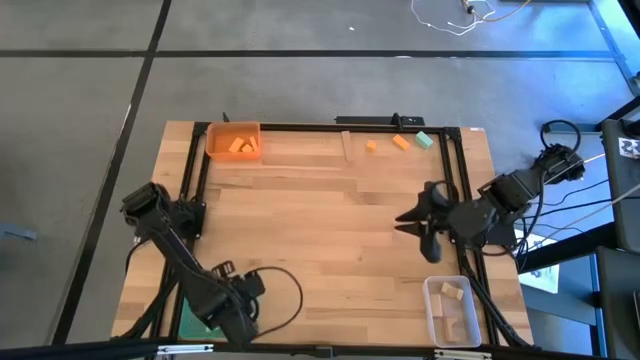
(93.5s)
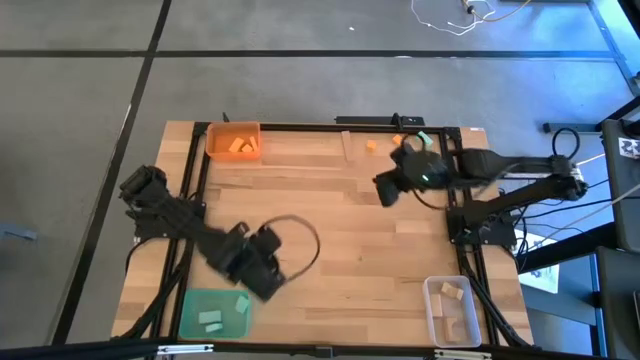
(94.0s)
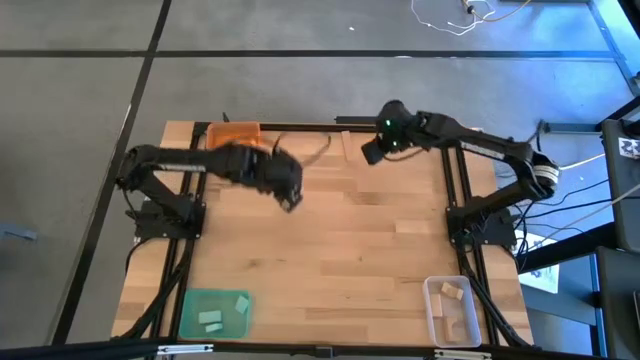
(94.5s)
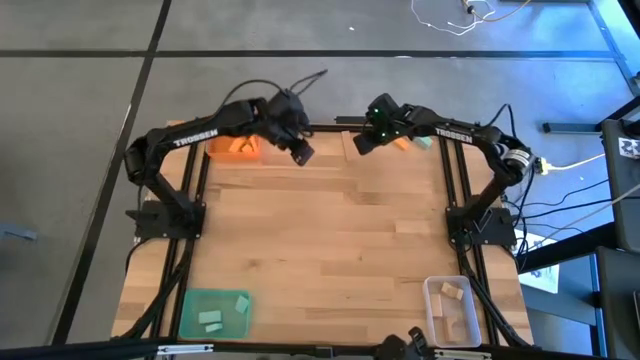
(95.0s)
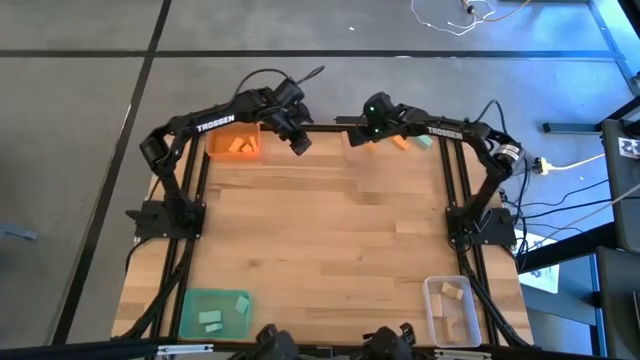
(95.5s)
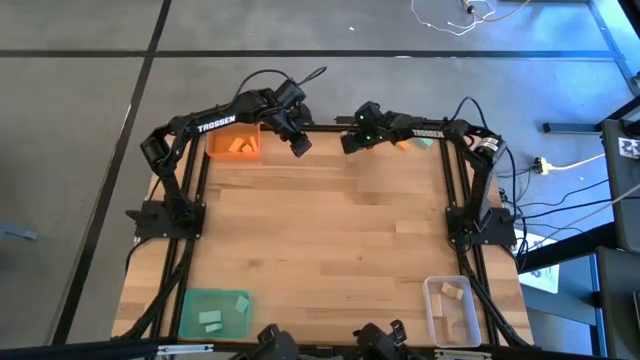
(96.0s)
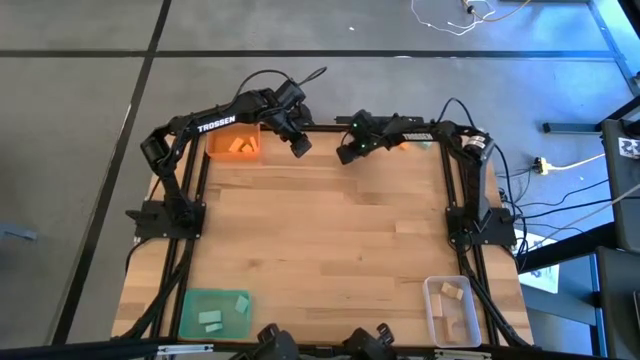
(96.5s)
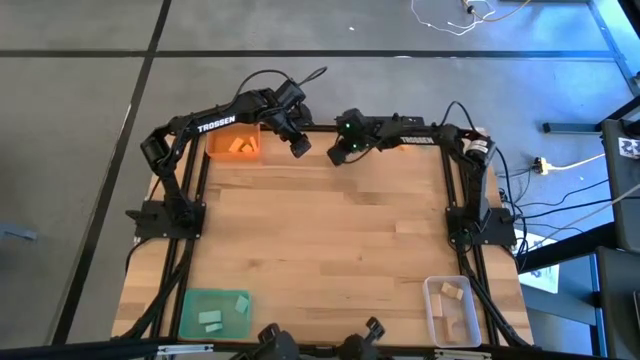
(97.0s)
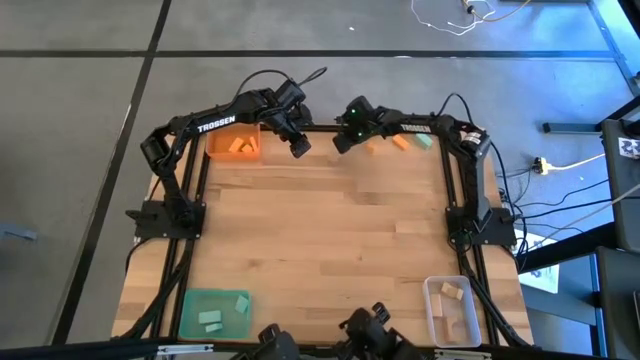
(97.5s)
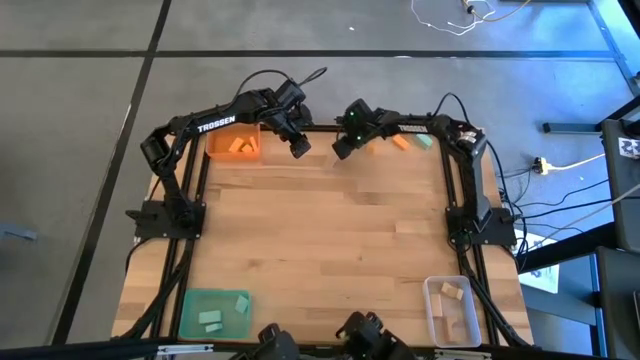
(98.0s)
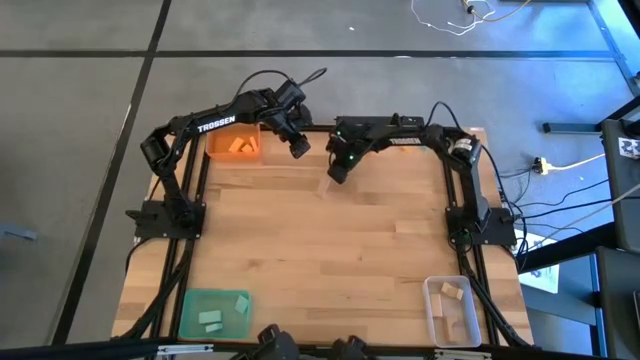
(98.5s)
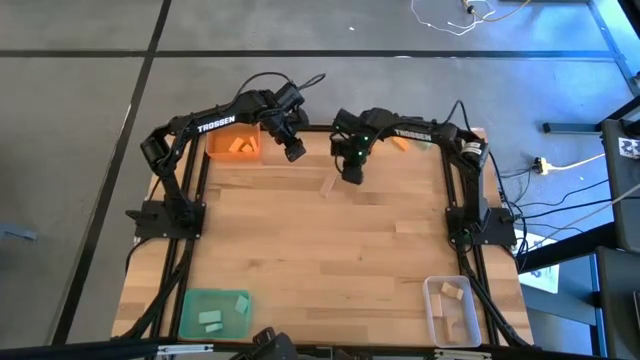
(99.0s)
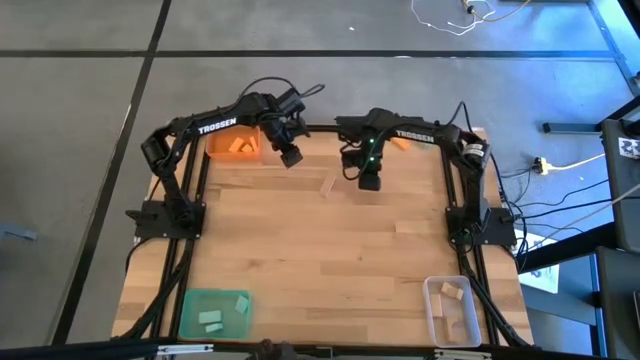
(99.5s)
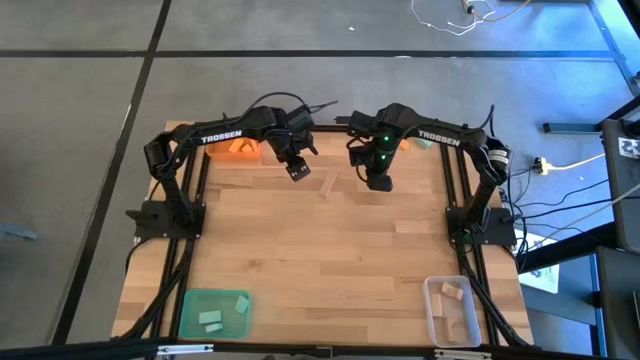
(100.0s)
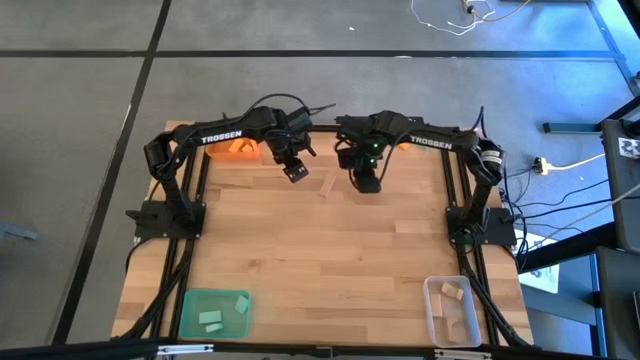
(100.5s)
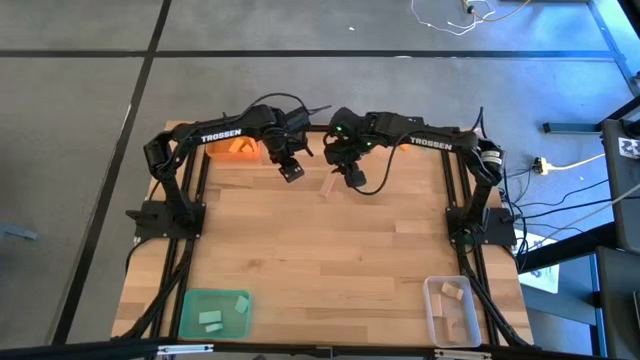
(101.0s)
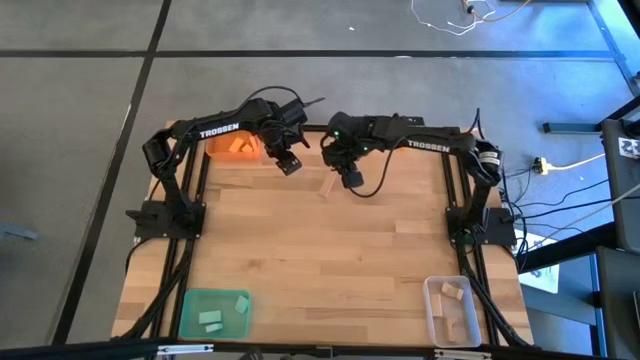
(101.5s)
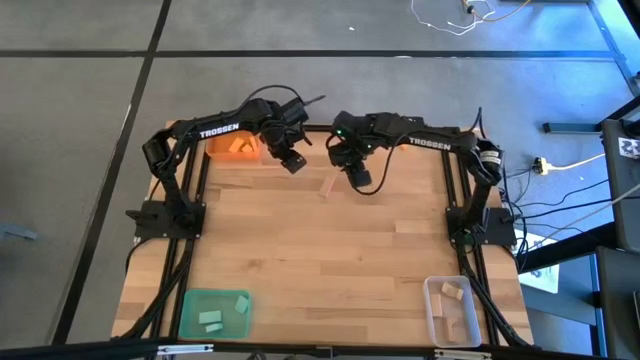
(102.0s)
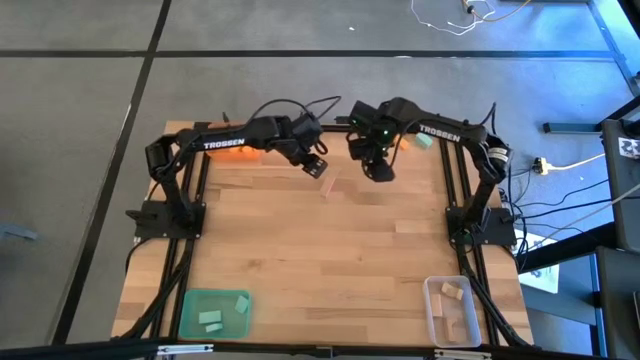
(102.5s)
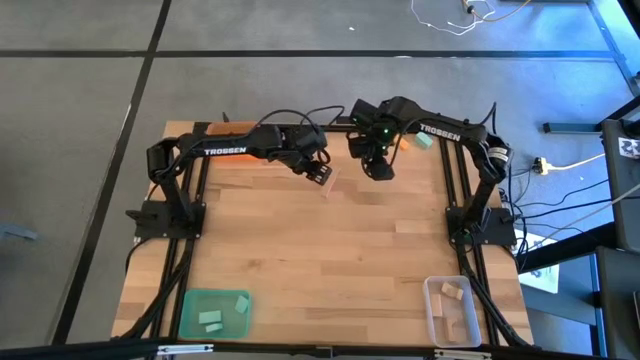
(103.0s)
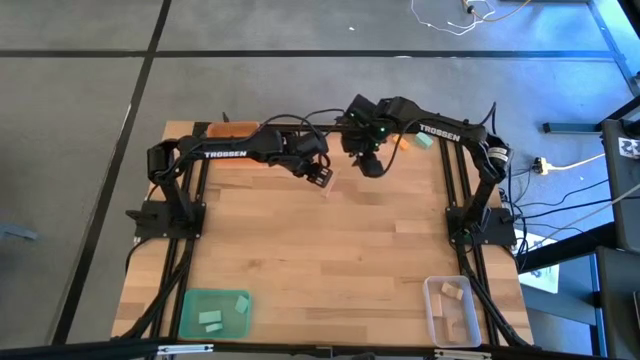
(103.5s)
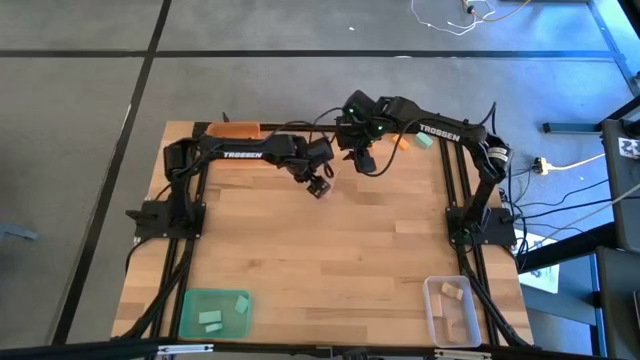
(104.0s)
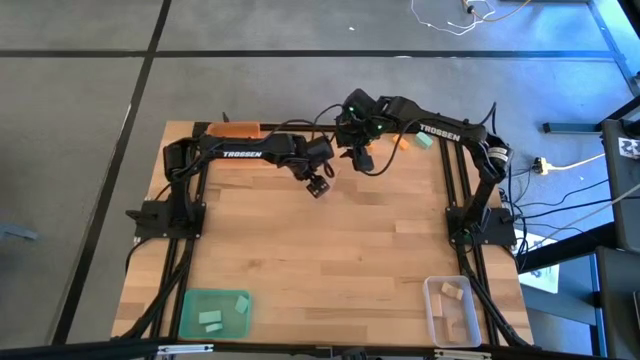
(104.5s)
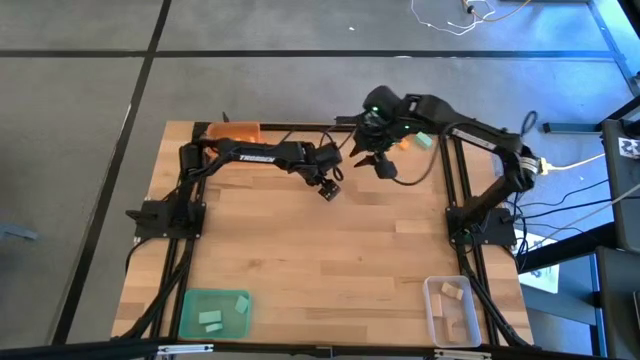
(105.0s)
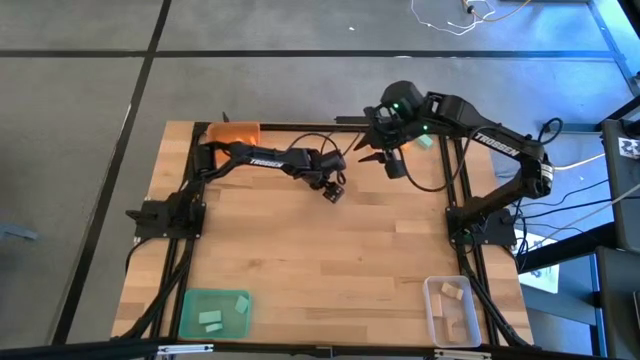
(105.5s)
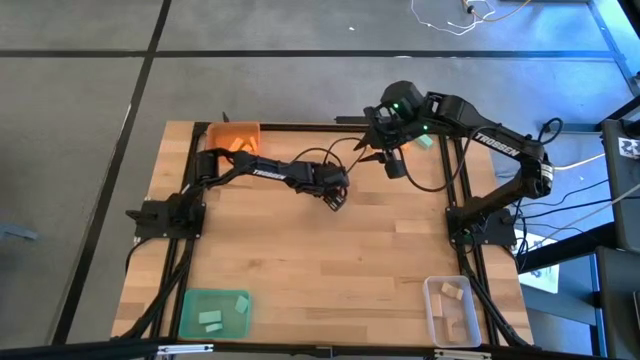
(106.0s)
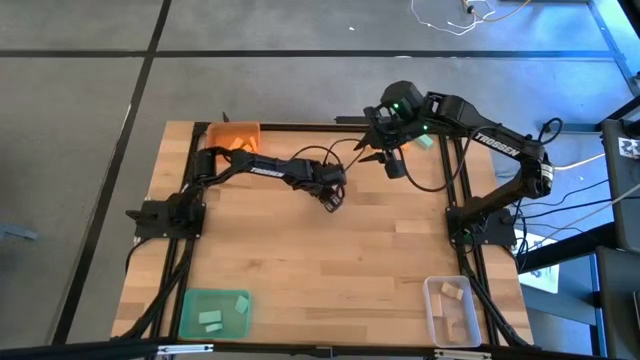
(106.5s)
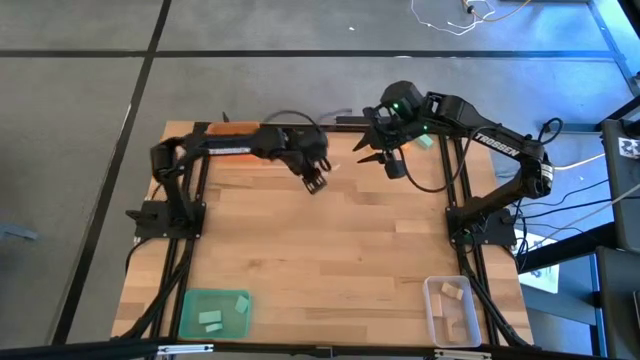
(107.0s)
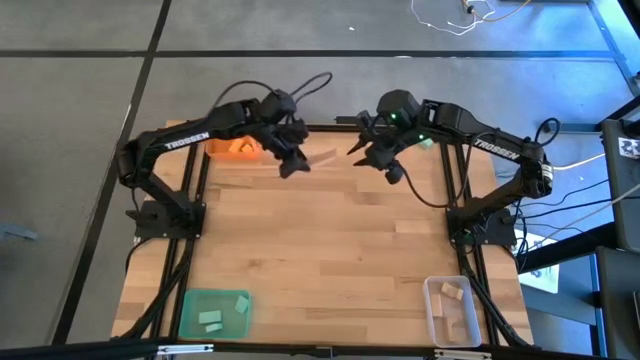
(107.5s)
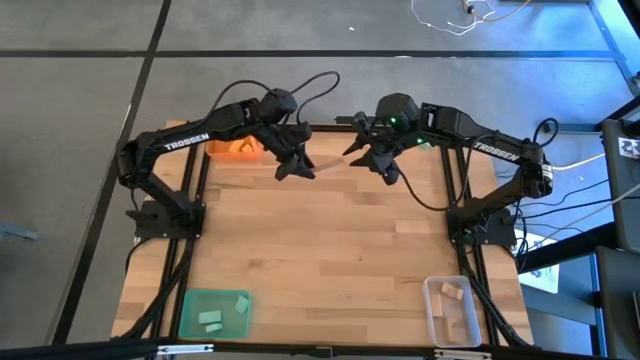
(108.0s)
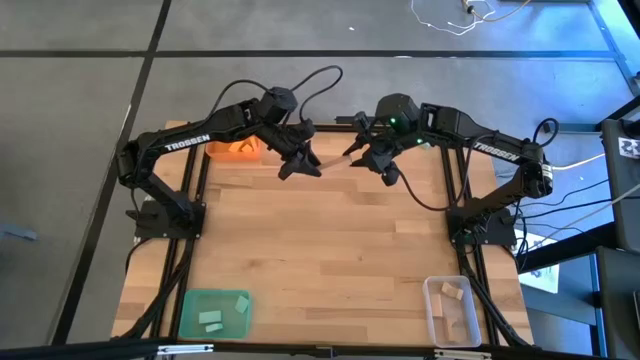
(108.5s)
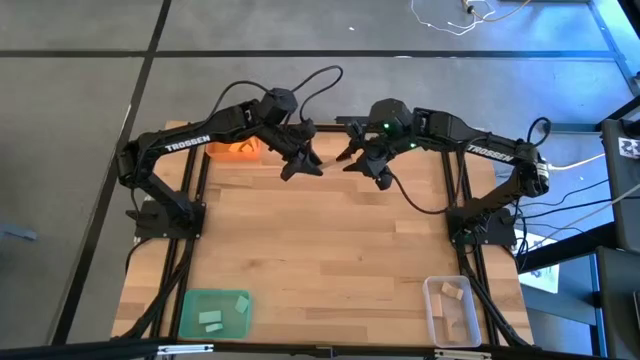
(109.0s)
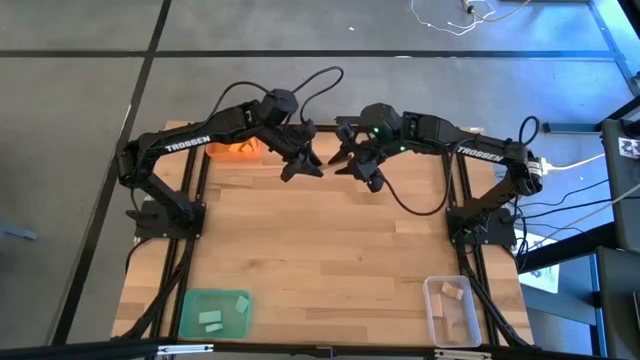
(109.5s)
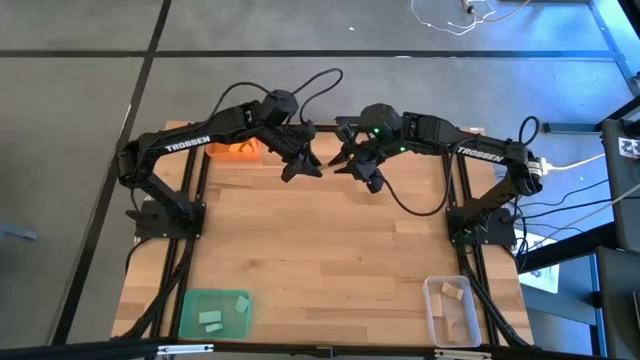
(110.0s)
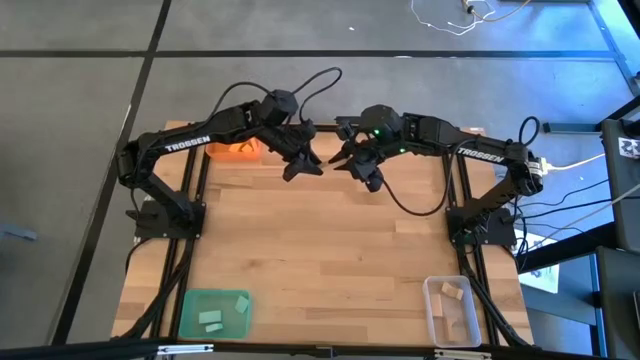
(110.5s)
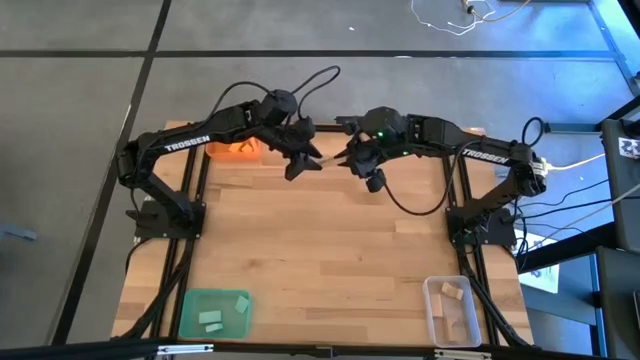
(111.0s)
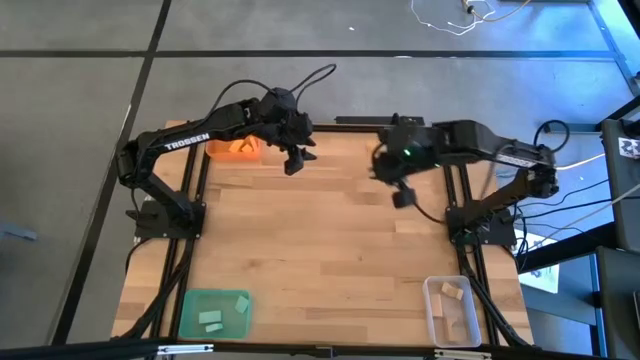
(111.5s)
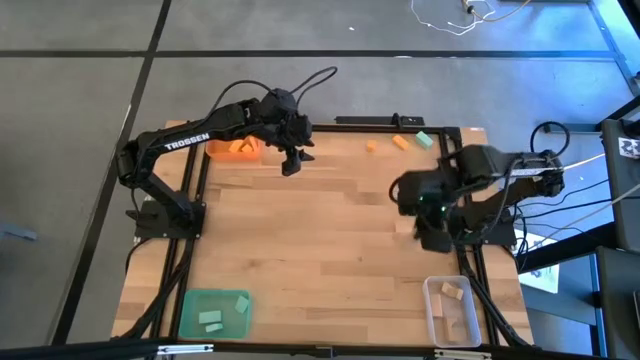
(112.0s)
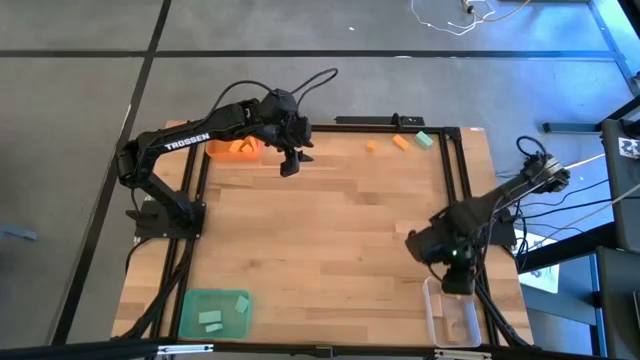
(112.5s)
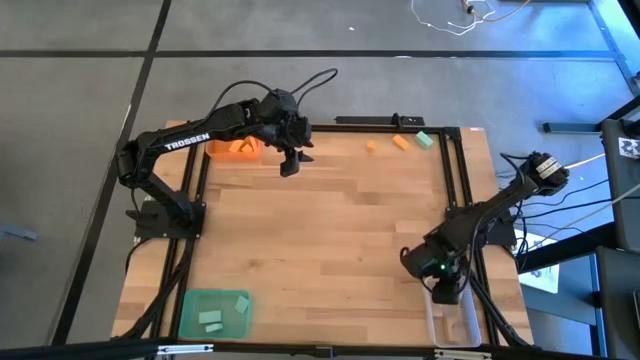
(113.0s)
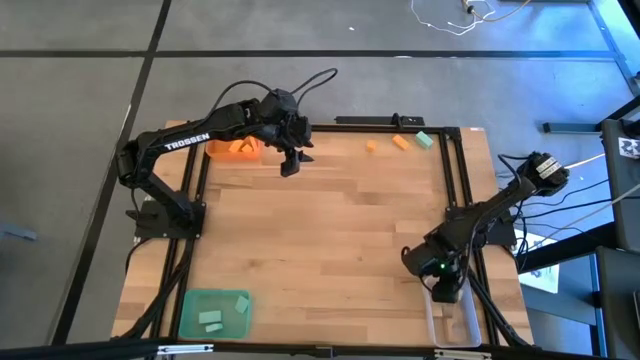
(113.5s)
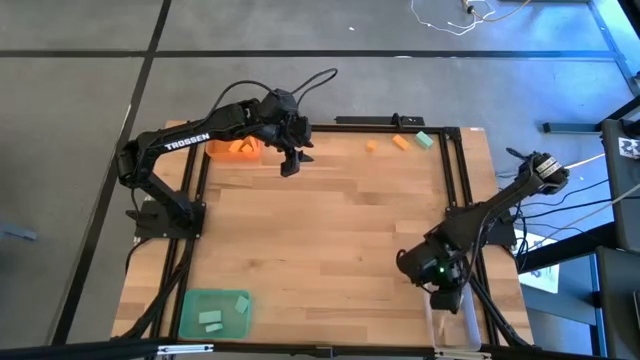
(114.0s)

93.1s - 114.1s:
Task: Sort & place blocks by color
Put the brown block into the transparent bin
